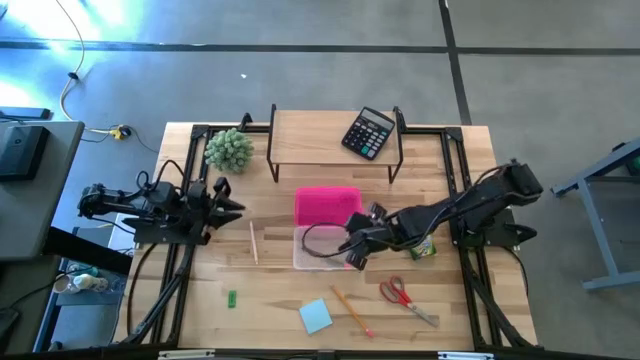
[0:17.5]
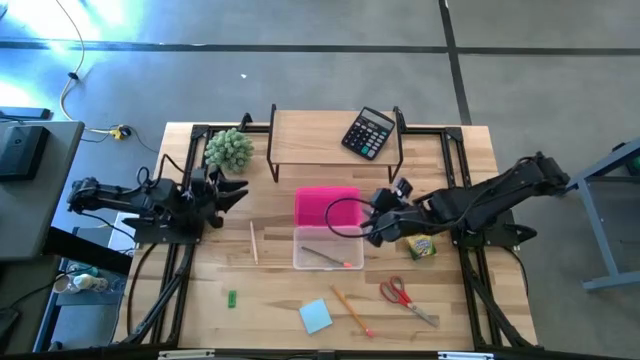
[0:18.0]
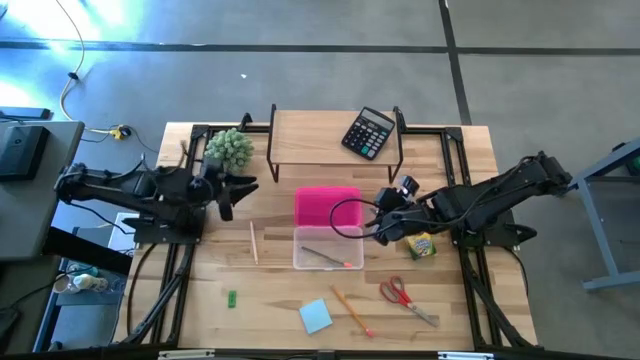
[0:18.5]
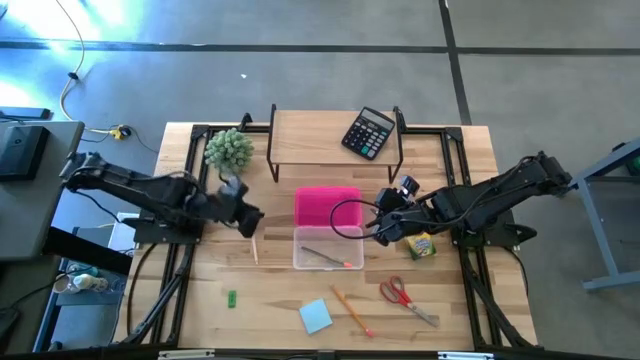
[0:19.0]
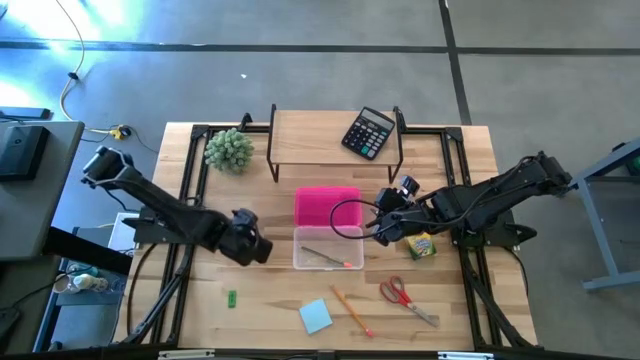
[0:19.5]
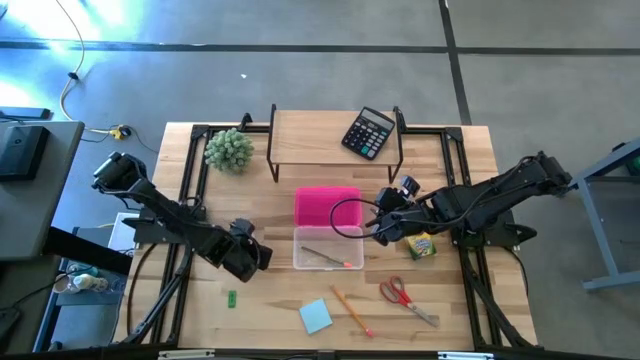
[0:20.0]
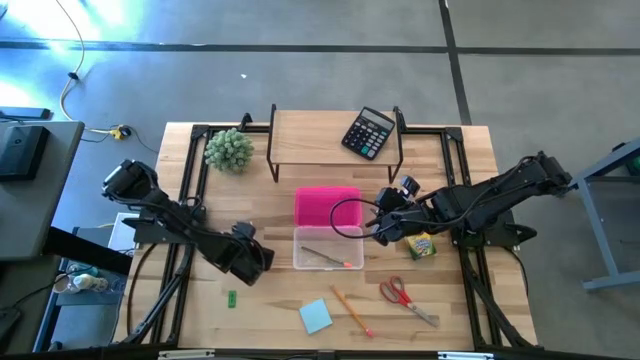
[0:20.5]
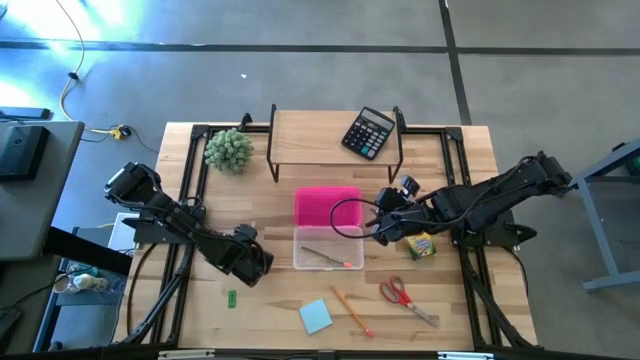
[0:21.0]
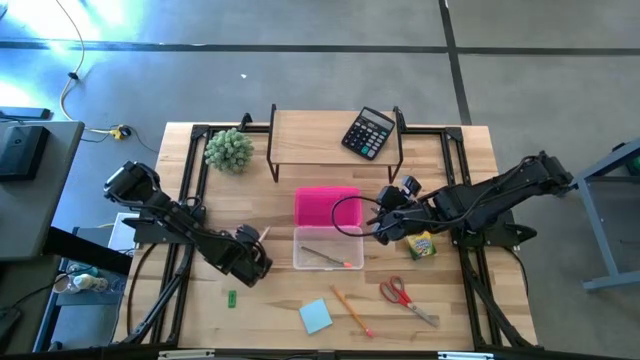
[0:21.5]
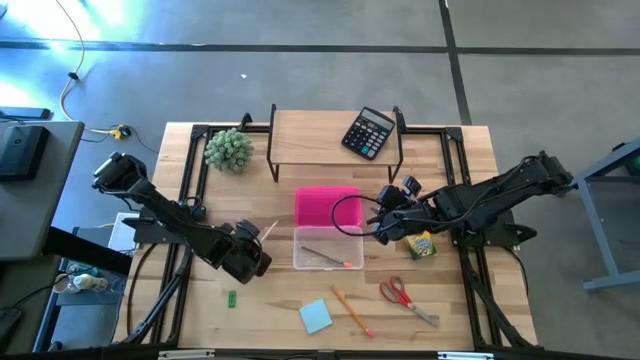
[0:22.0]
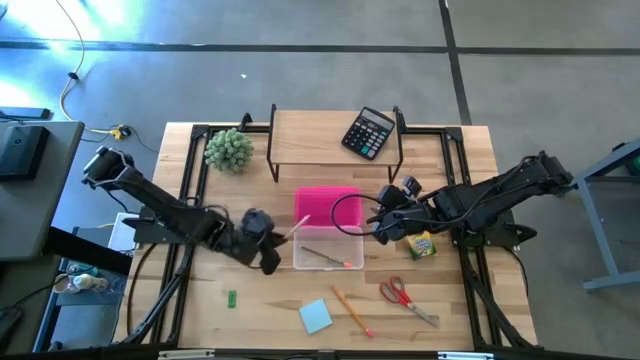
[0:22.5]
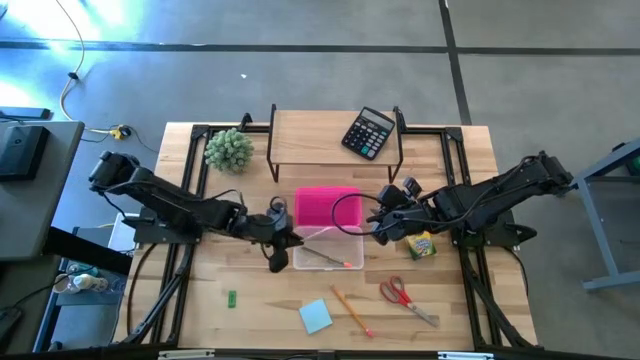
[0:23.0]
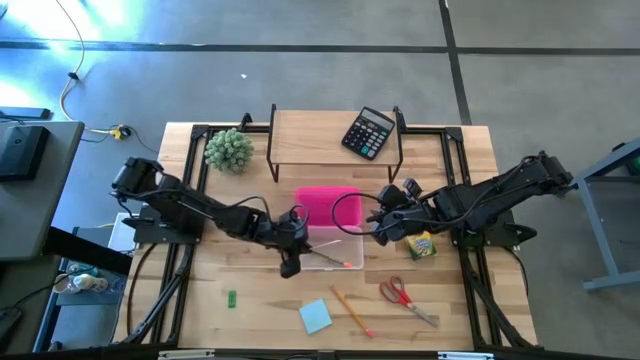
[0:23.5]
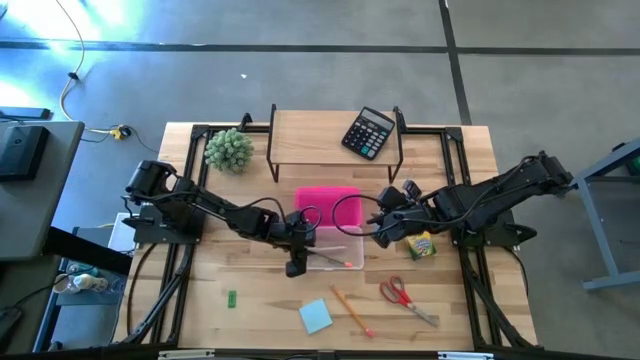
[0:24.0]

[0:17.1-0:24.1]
Task: Pack school essentials
Put the white pen into the supply box

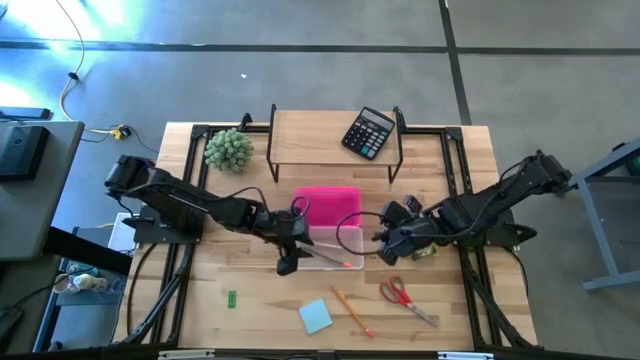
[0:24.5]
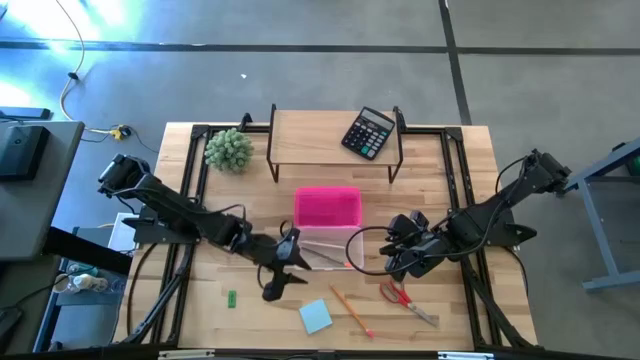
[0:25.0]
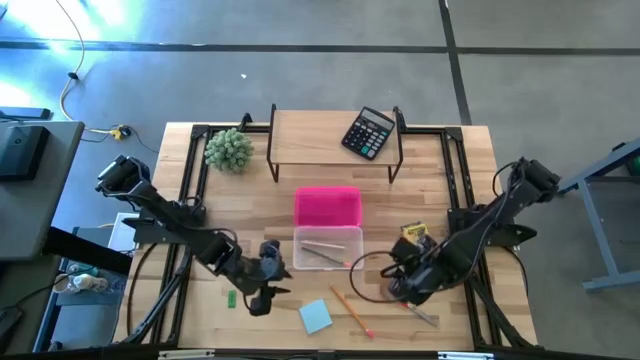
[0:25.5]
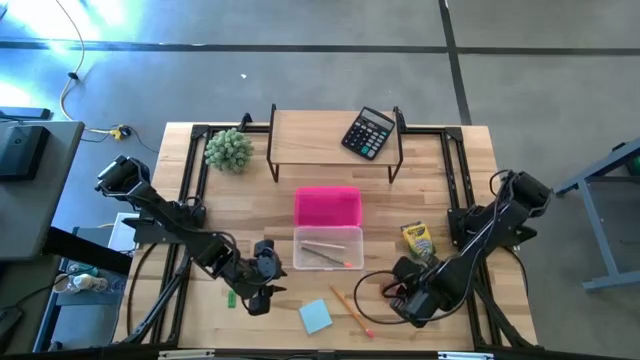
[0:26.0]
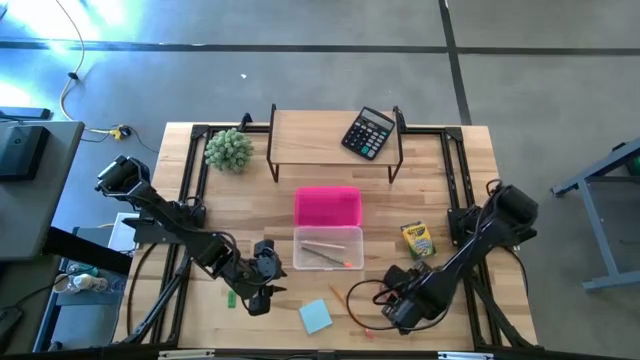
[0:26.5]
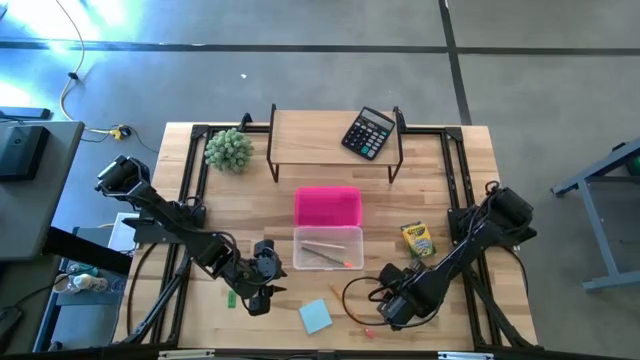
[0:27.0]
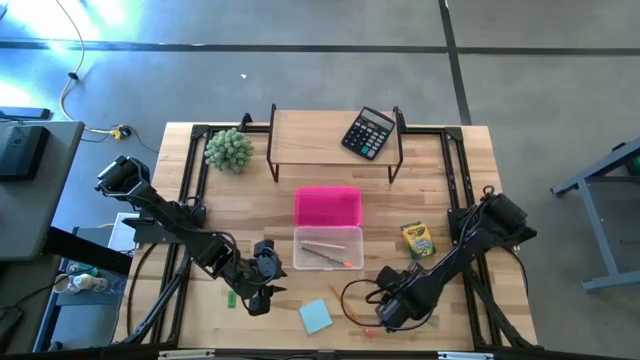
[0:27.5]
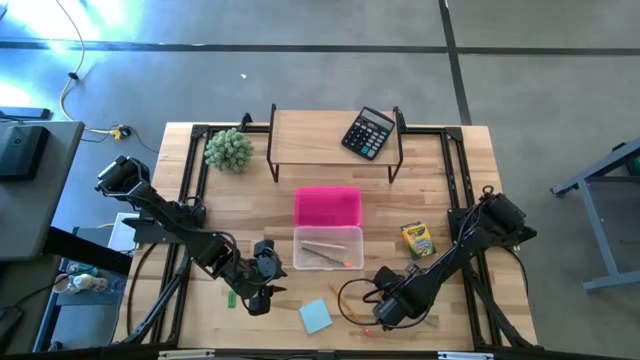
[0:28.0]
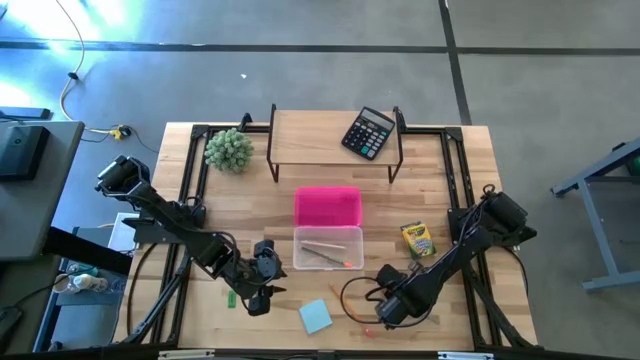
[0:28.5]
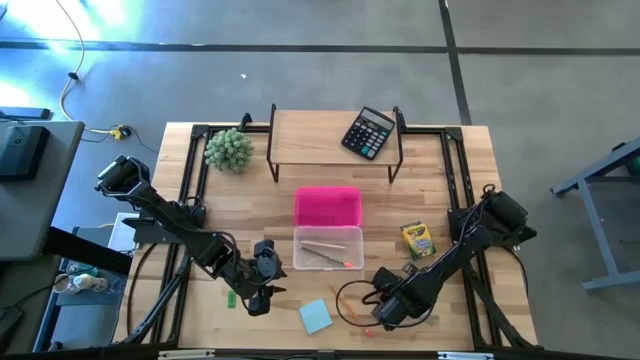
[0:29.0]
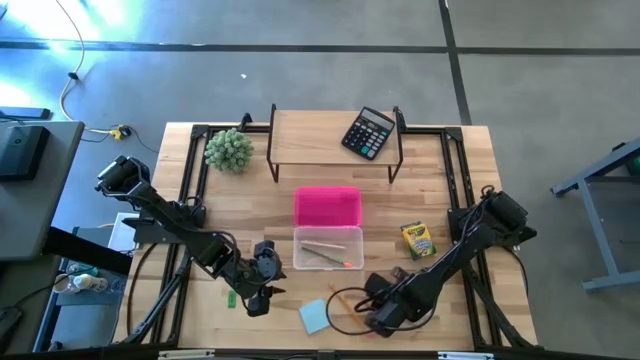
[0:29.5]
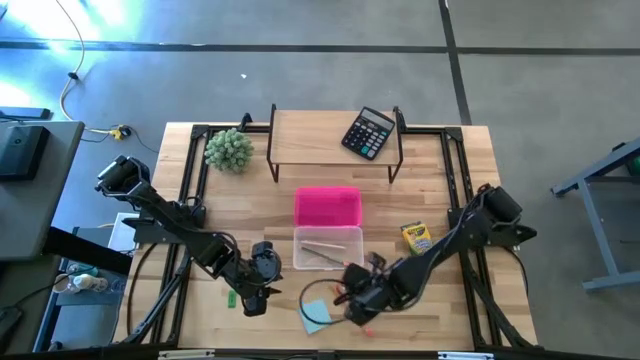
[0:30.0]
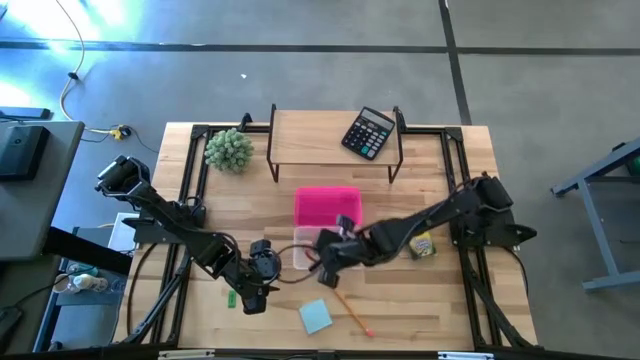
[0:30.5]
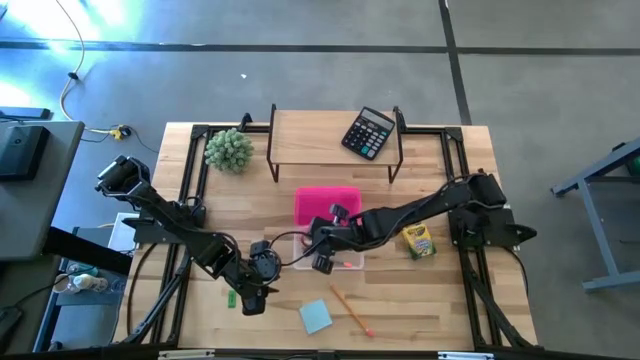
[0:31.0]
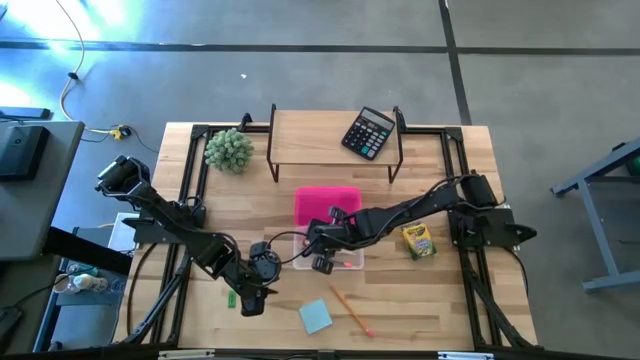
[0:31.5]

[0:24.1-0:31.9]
Put the orange scissors into the supply box

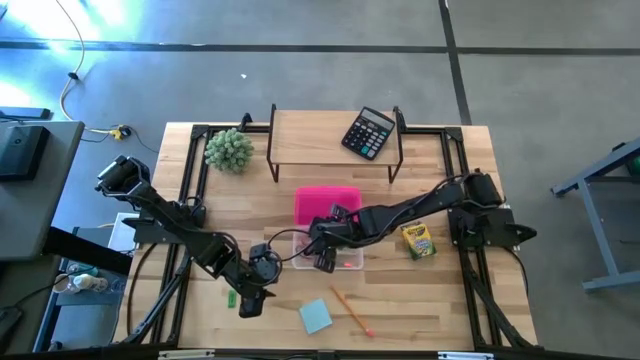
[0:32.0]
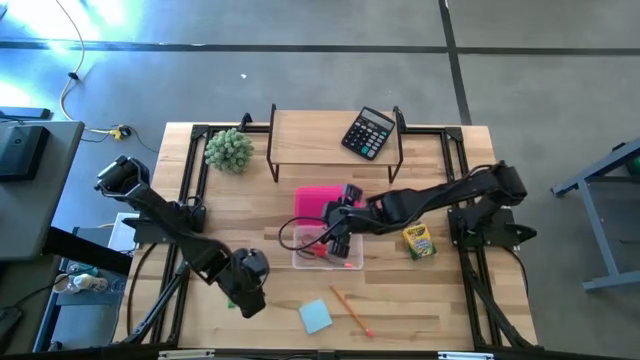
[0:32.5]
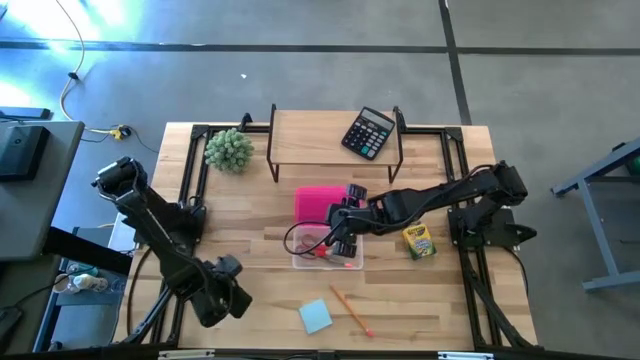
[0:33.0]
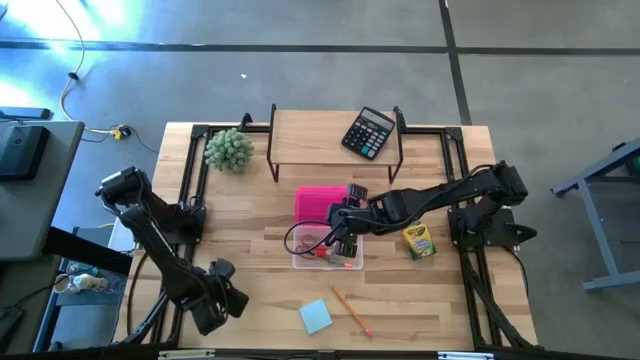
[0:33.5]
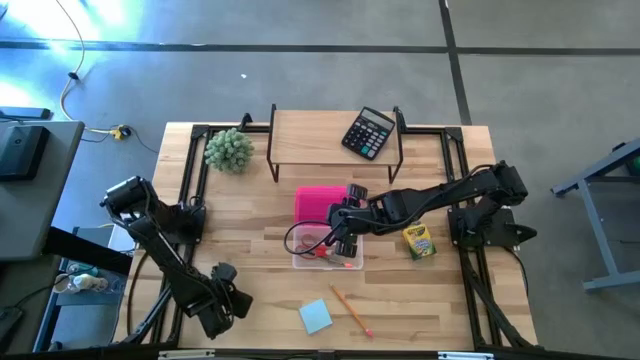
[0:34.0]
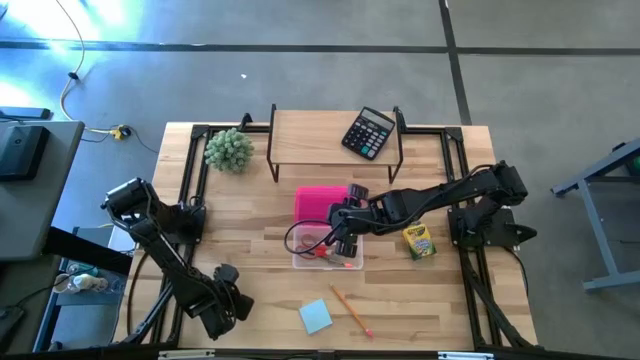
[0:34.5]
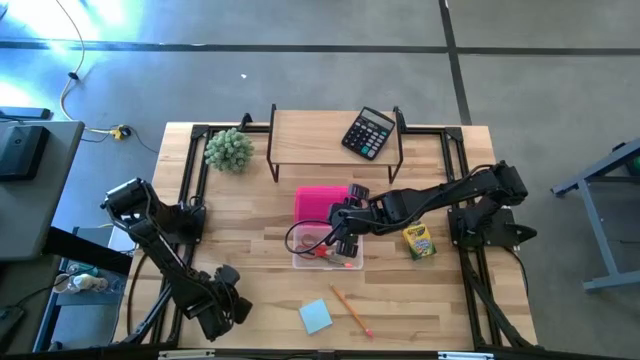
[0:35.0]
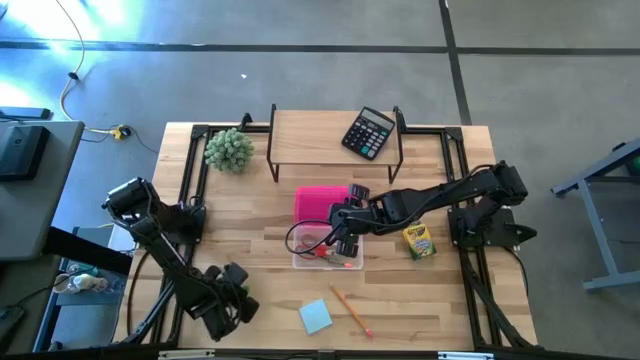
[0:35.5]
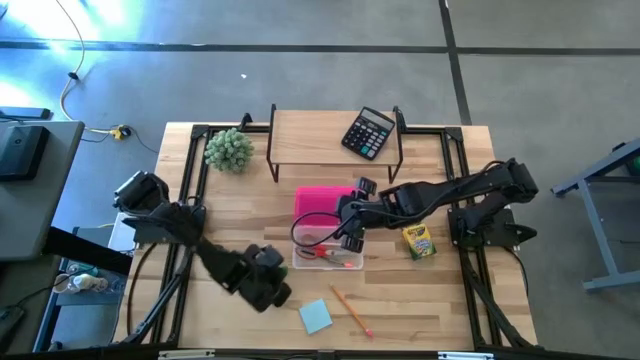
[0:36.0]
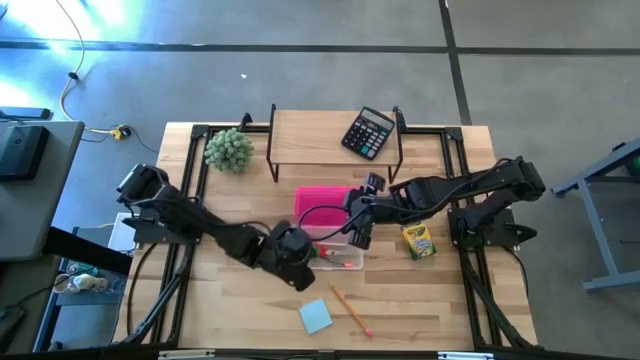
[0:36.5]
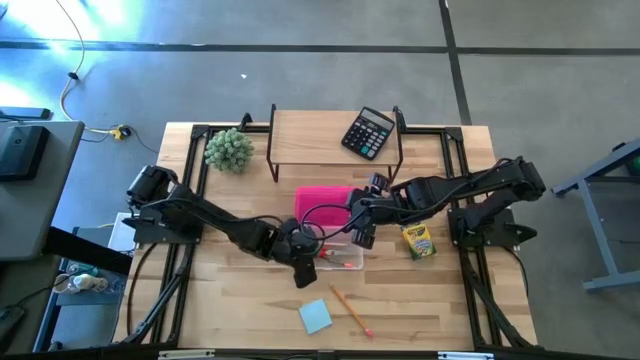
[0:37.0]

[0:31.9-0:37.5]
Put the green eraser into the supply box

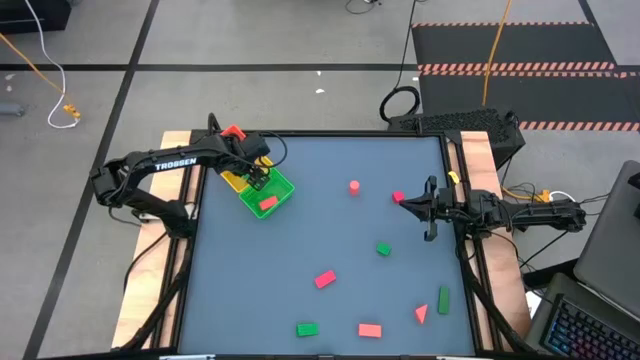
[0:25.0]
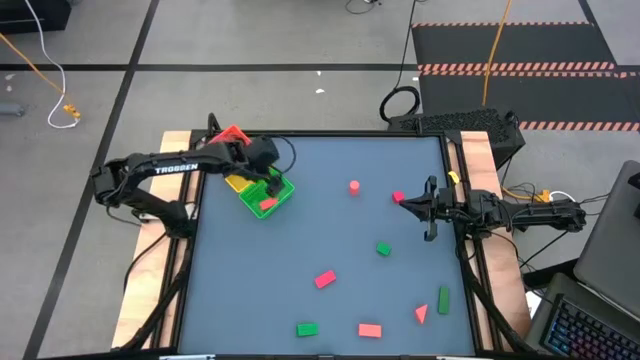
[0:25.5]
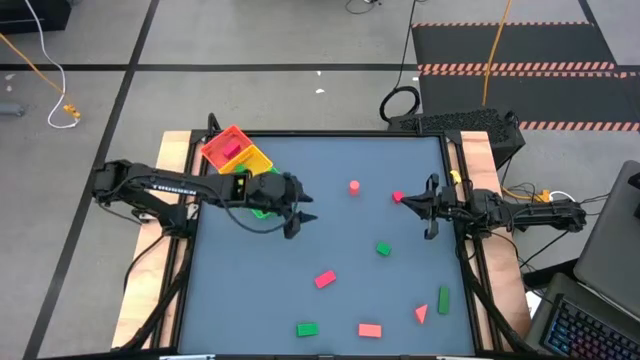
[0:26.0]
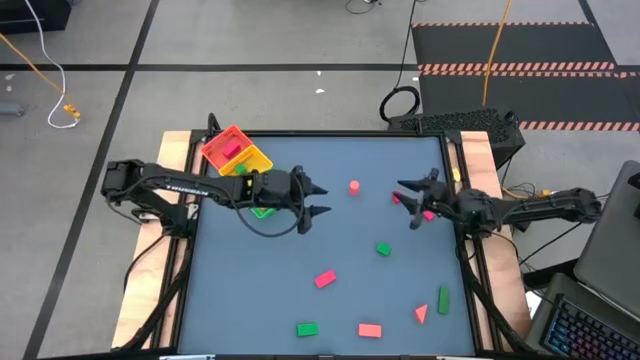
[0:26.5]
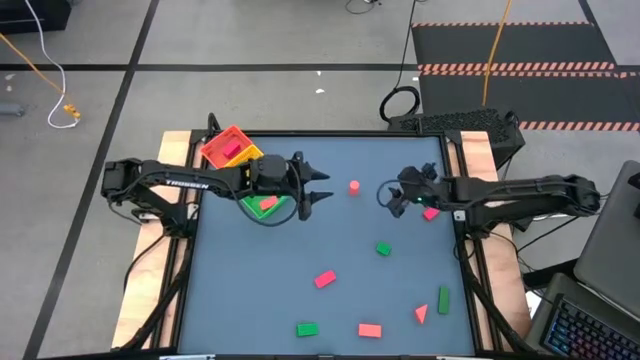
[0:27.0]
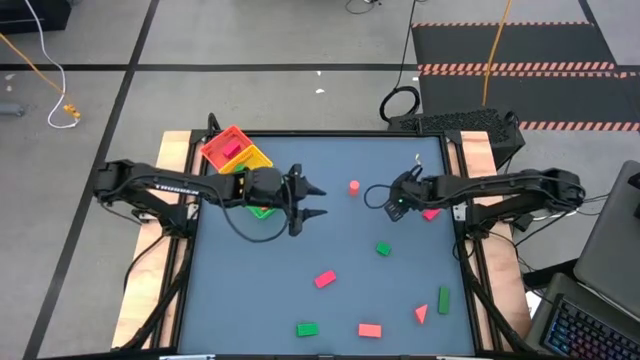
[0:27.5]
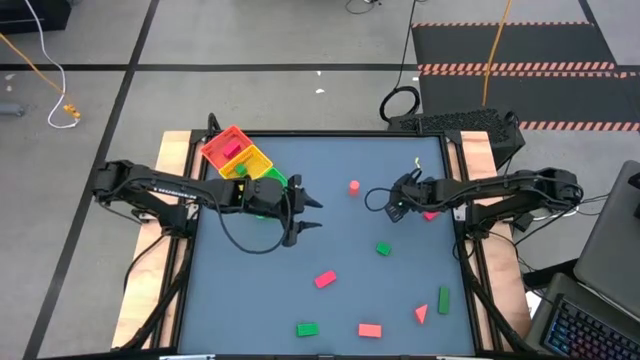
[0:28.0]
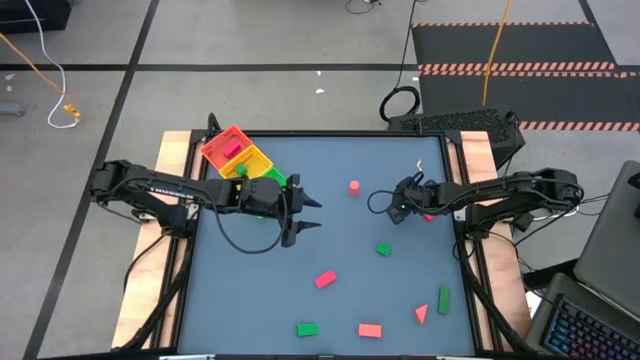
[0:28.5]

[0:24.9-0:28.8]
Task: Sort & place blocks by color
Put the red block into the orange basket
